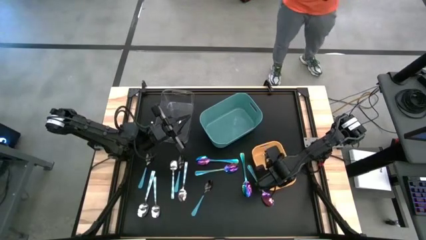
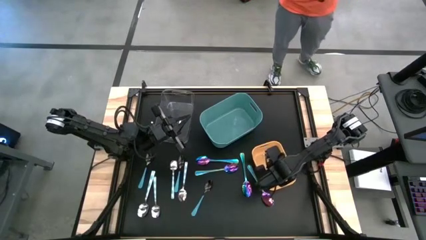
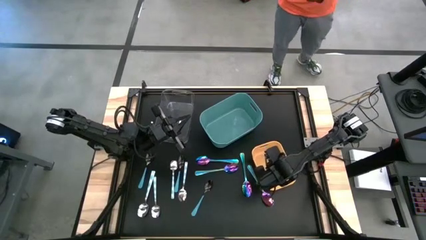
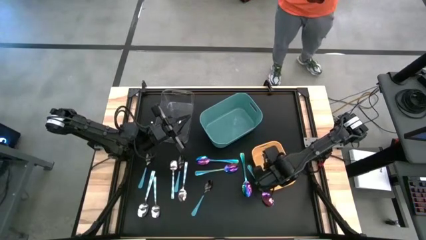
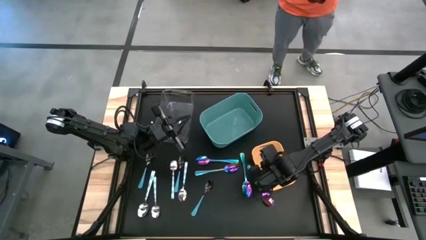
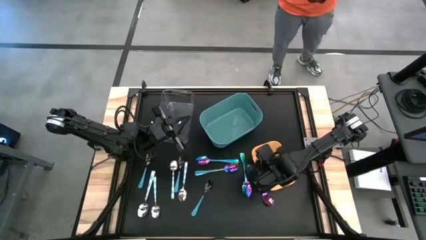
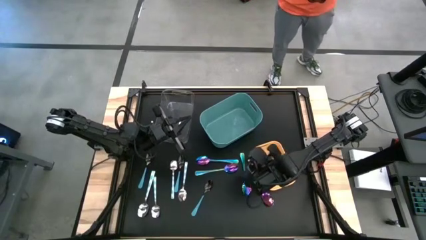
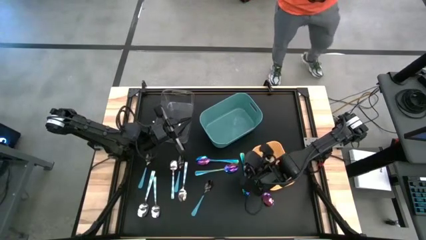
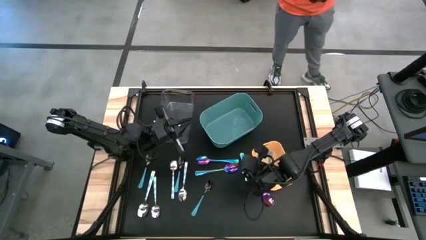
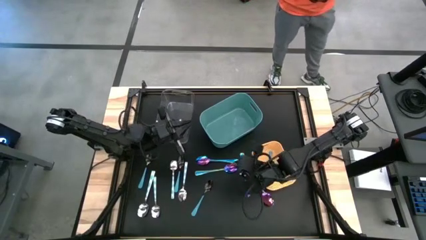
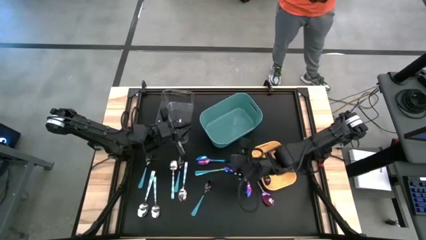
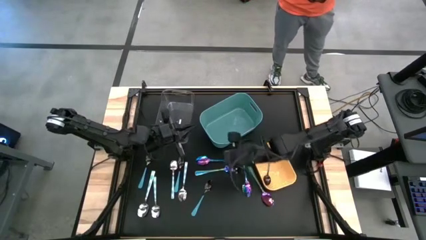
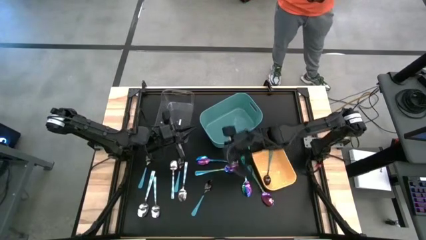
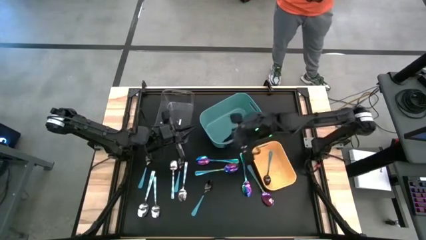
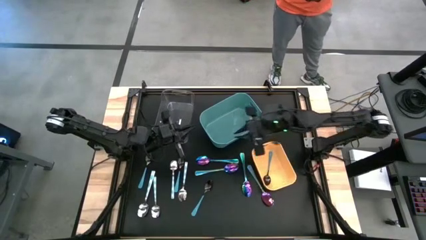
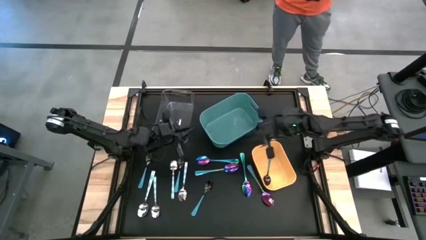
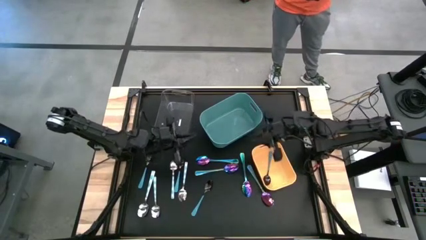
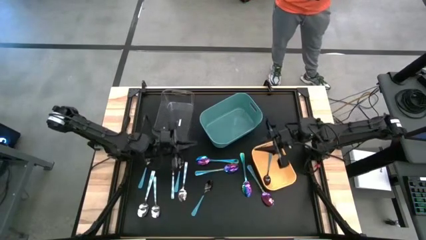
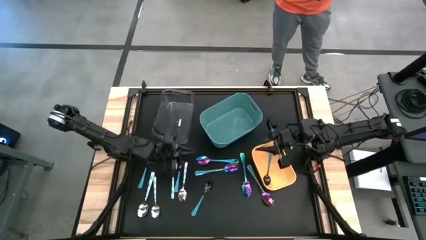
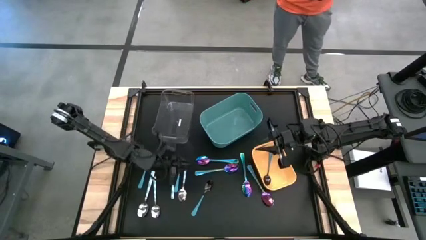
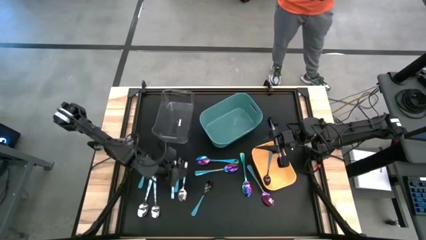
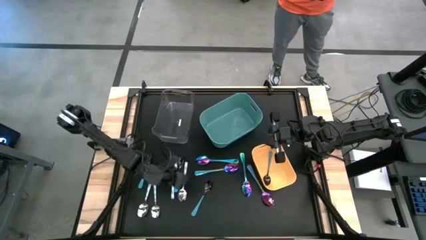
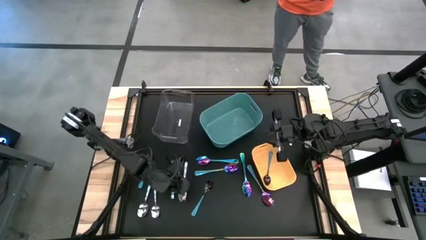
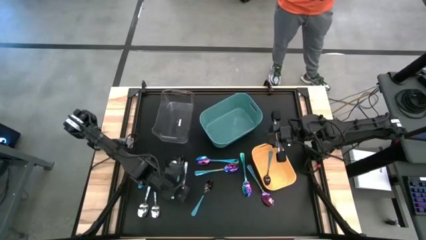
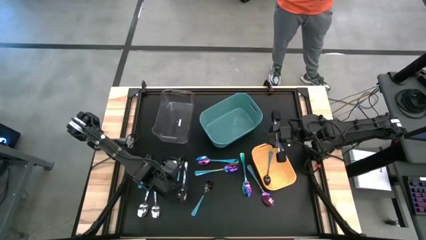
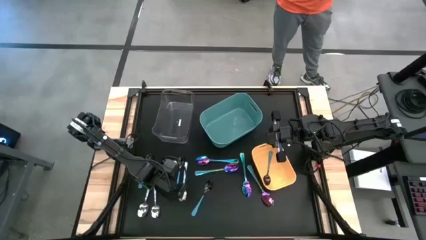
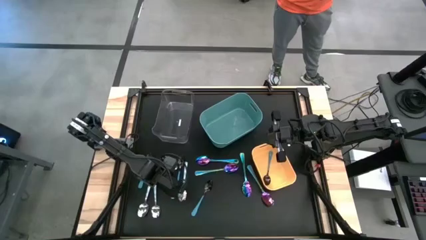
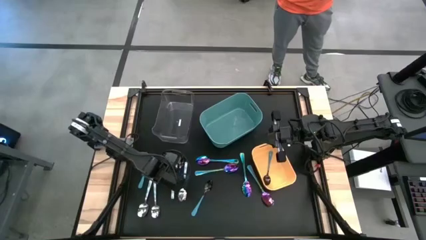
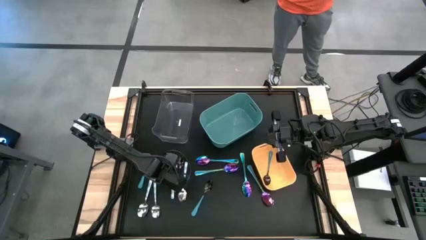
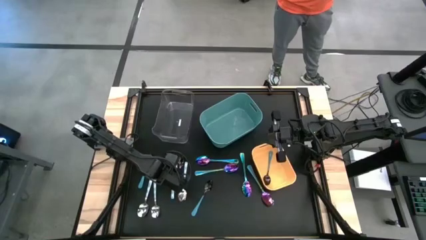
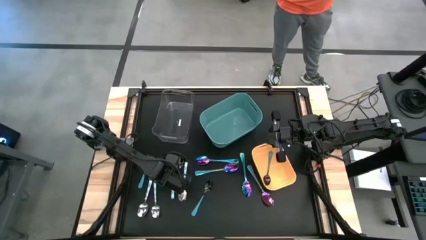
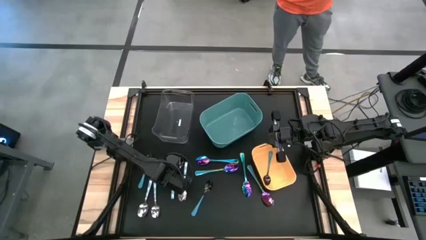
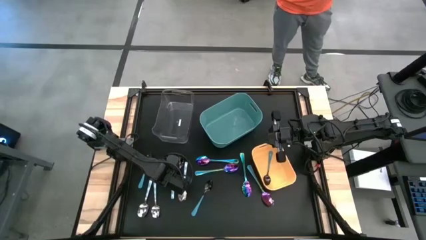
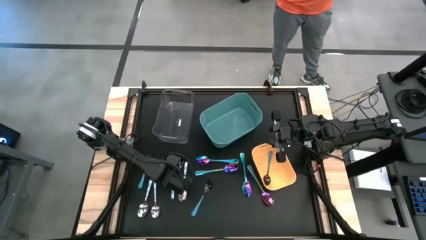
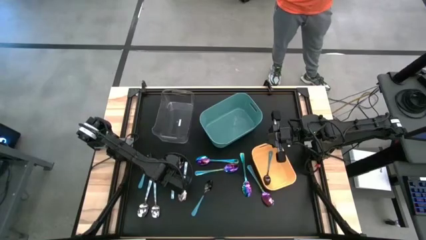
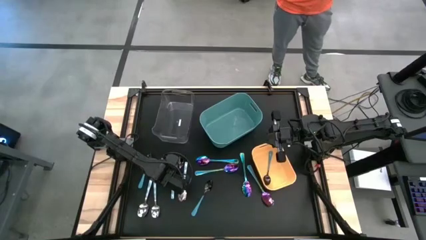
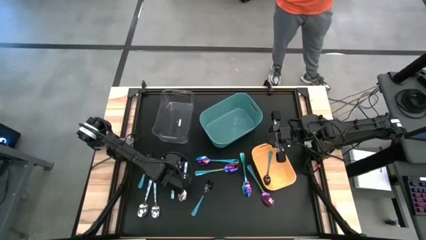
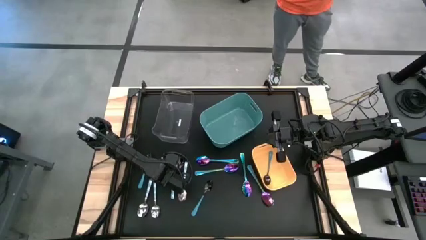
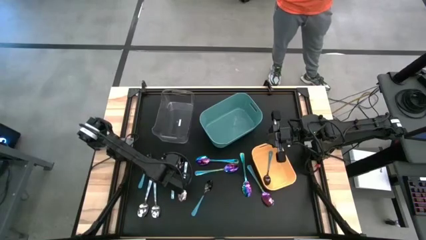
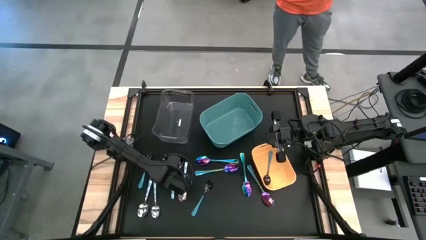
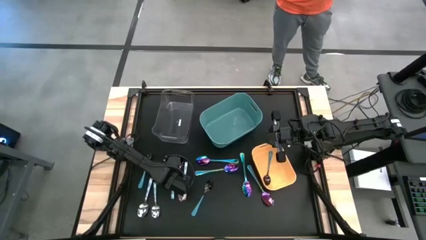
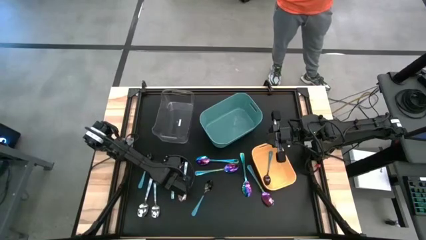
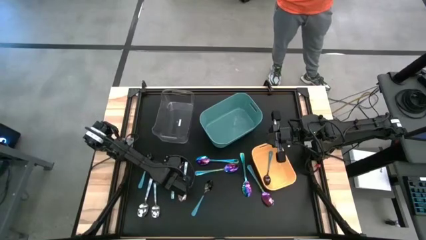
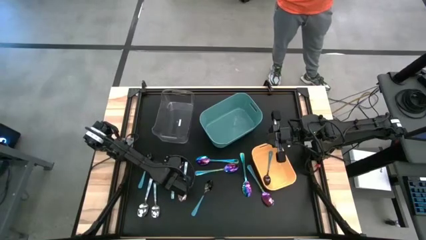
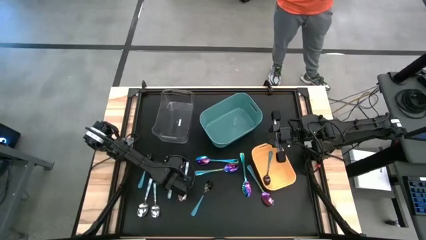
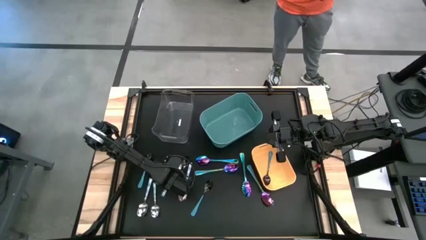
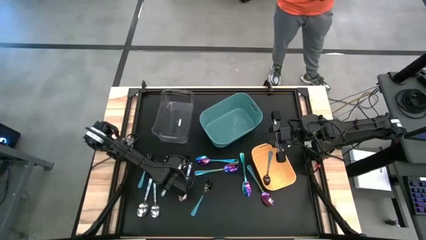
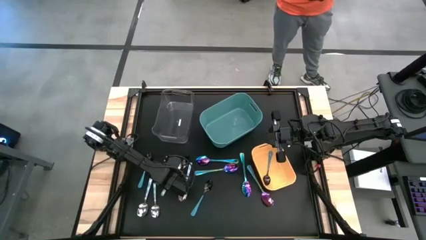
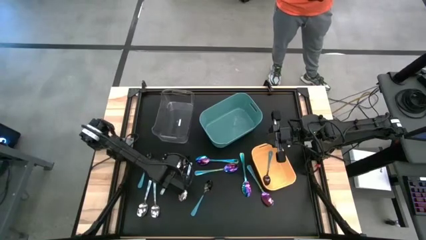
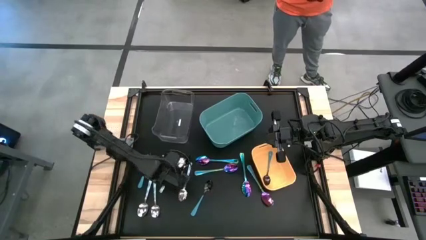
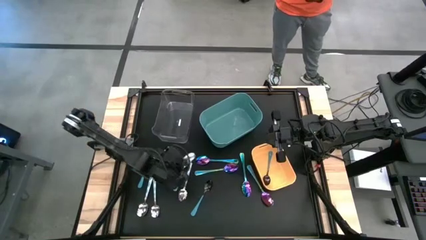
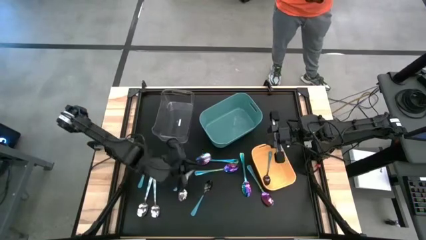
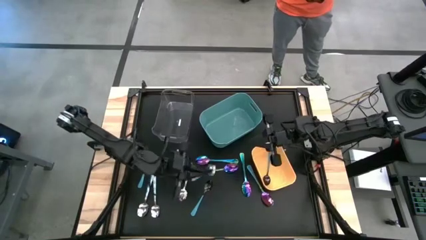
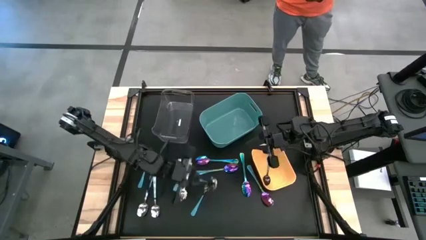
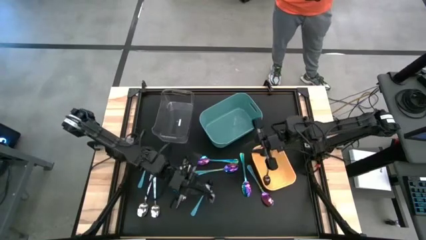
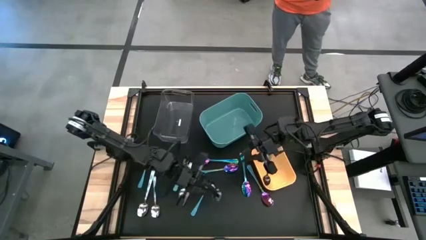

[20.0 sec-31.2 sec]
Task: Sort silverware by color (type)
Put the patterned blue spoon into the transparent bin

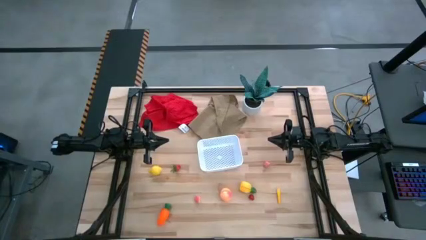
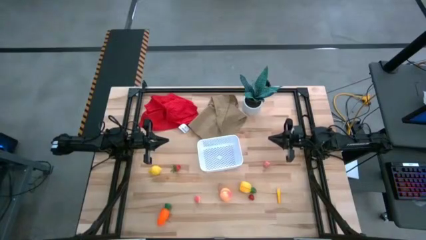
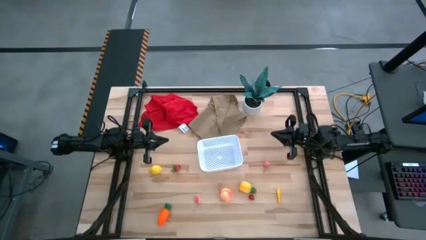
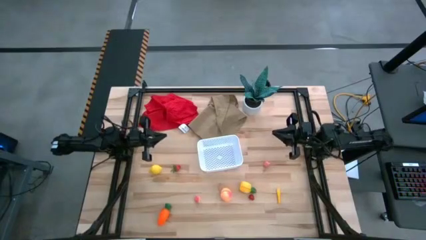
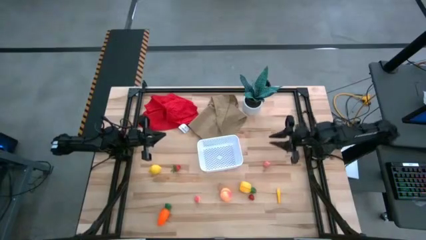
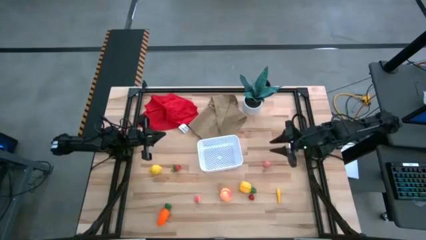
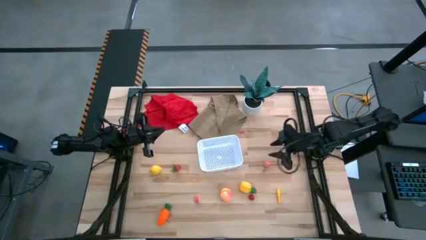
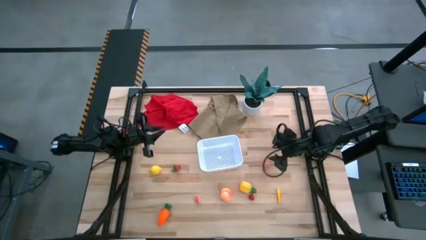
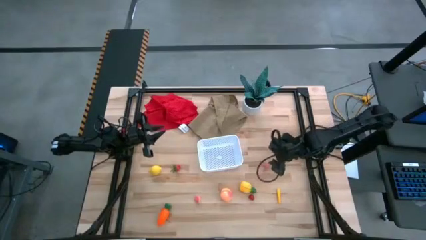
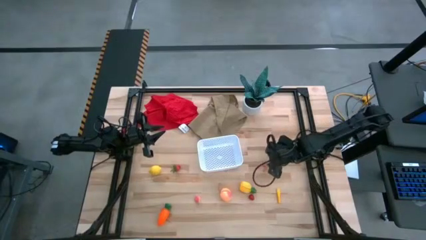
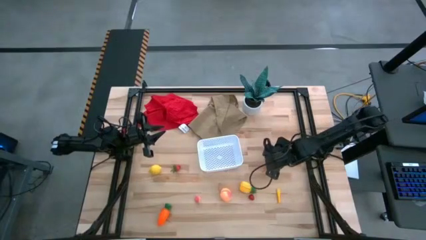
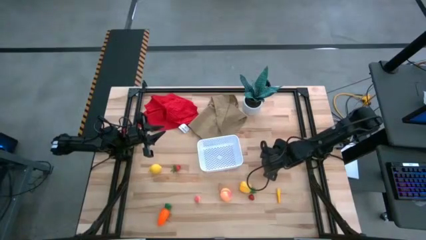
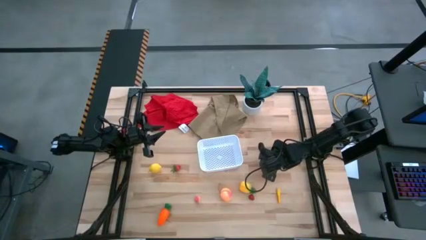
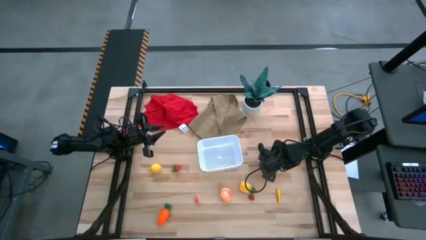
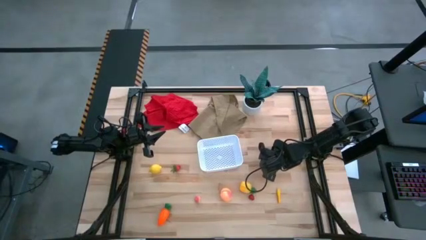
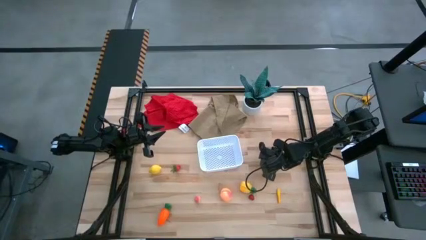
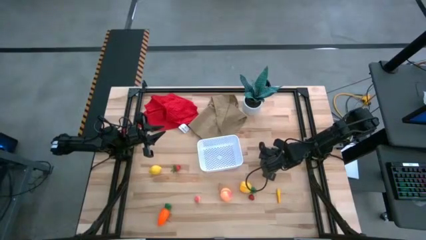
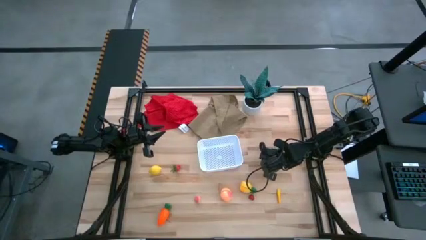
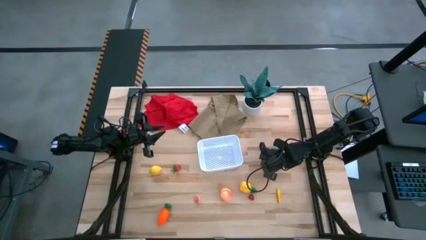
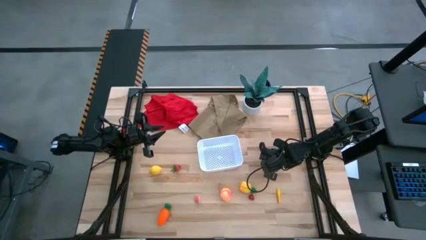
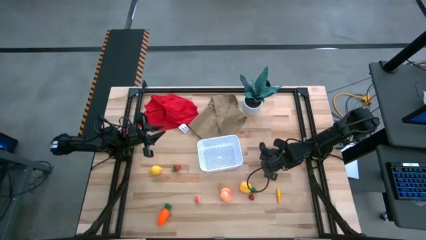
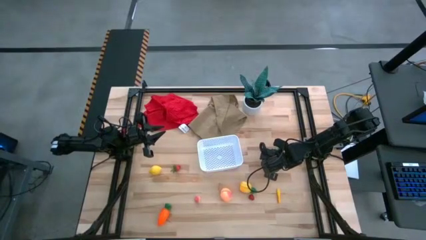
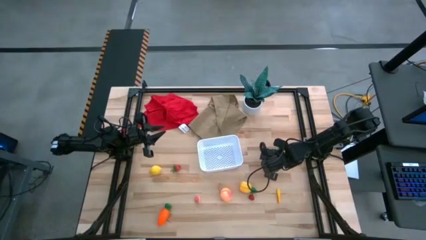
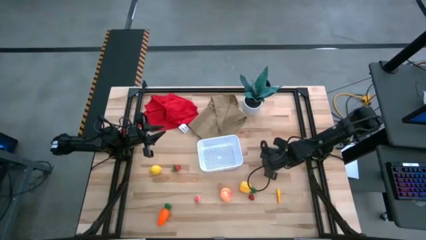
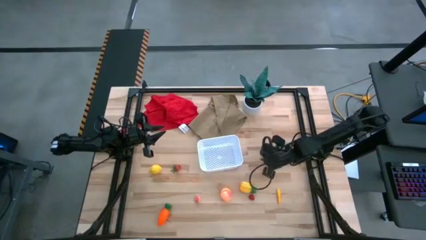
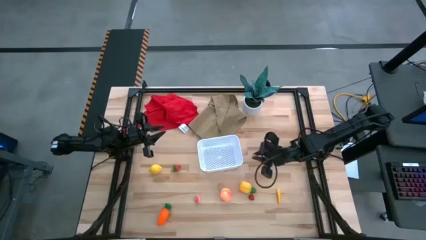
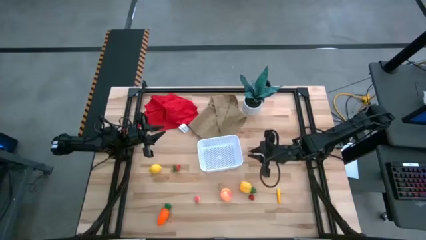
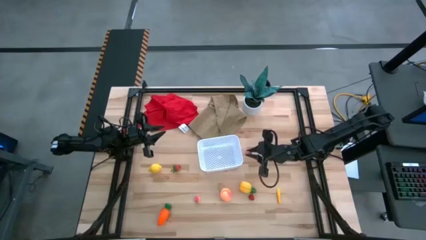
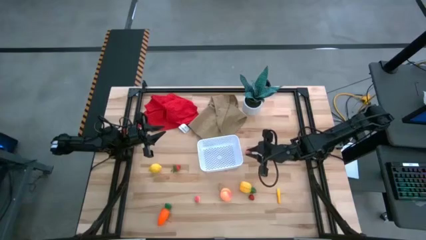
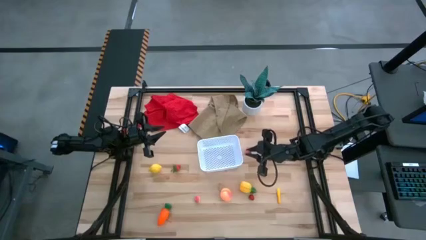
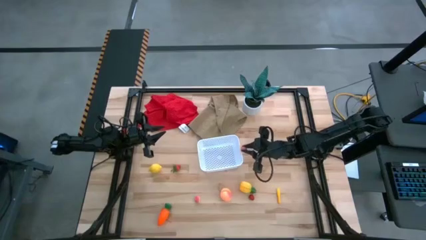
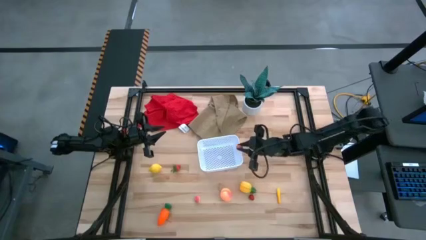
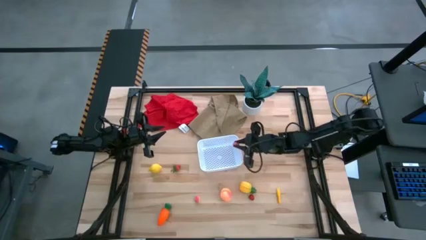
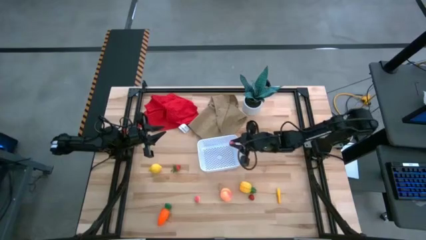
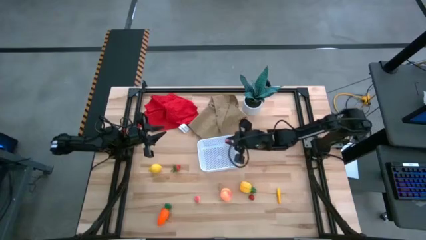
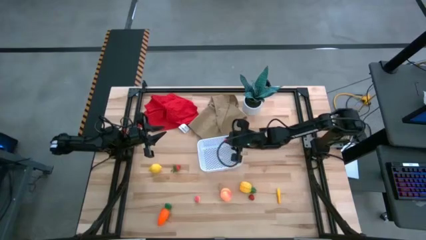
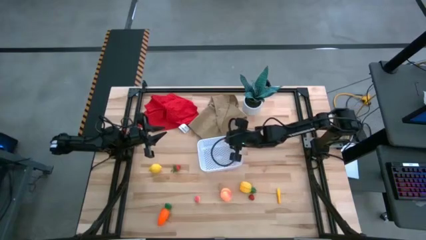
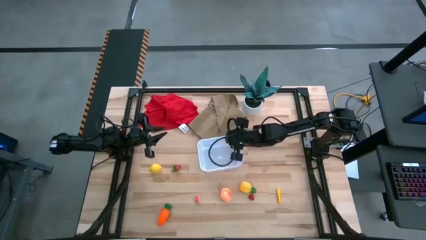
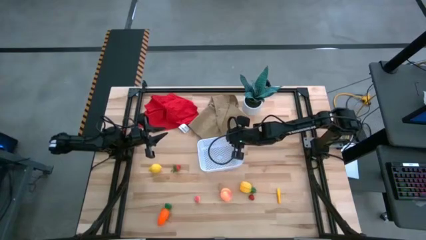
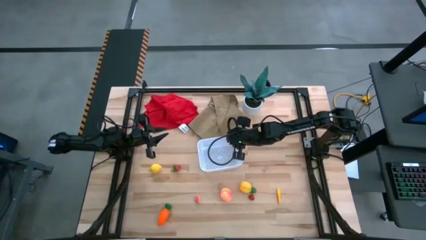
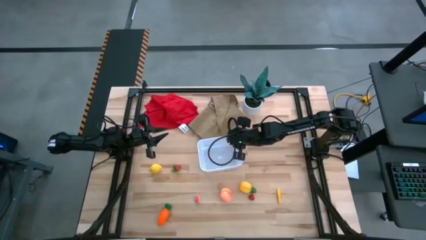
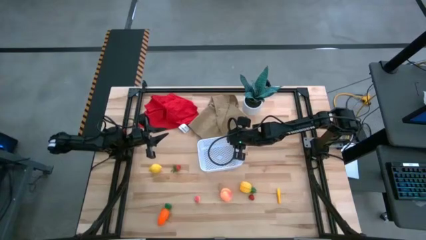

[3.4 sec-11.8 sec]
Task: Pick and placing Produce into tupperware
Put the right peach into the white bin
